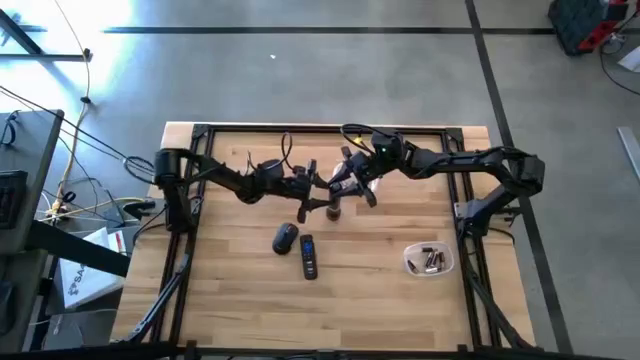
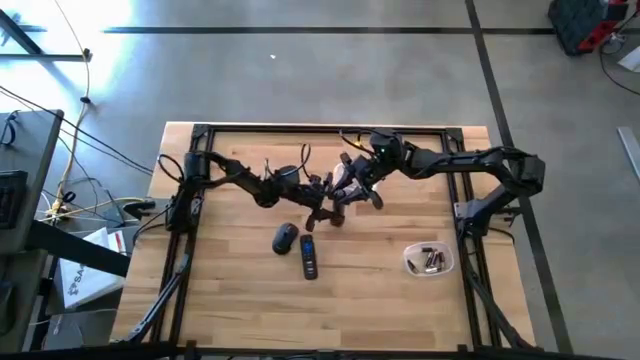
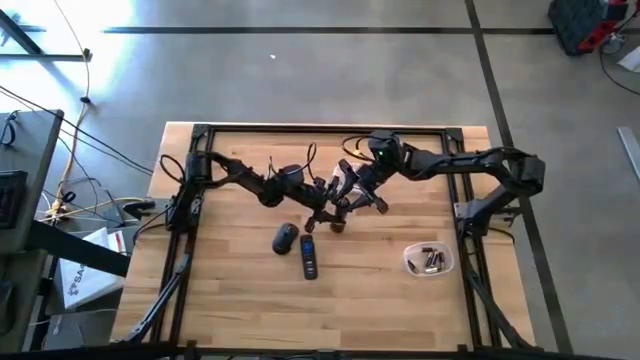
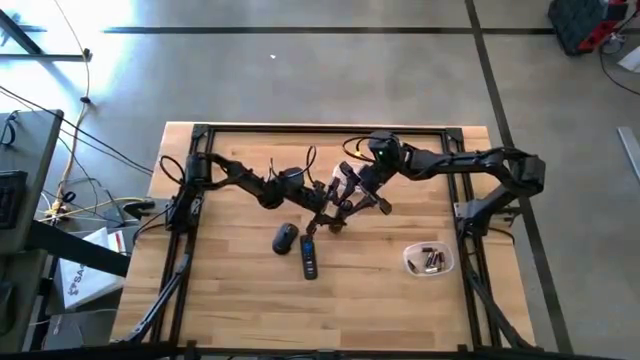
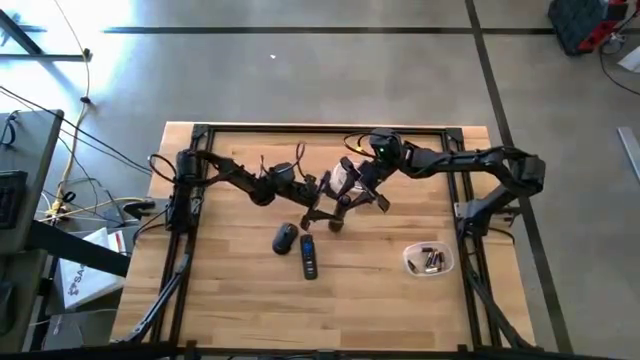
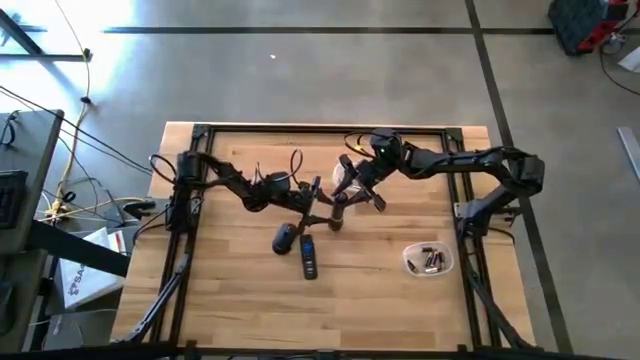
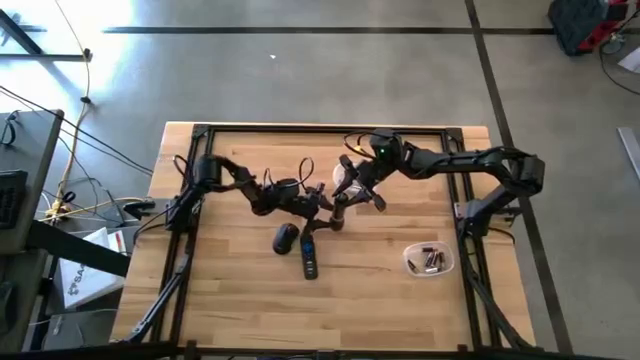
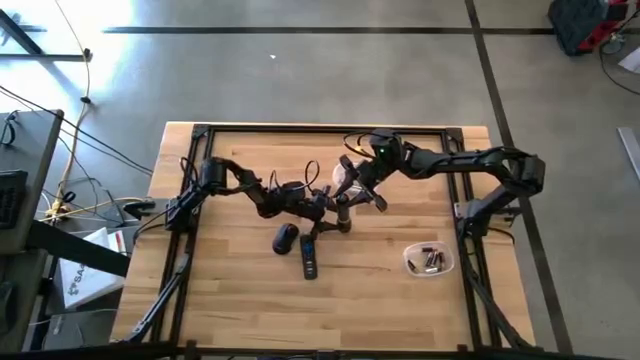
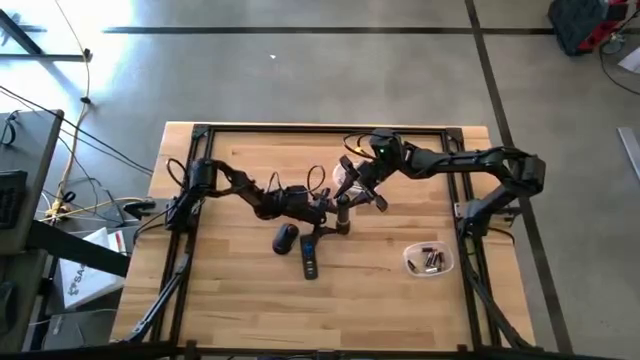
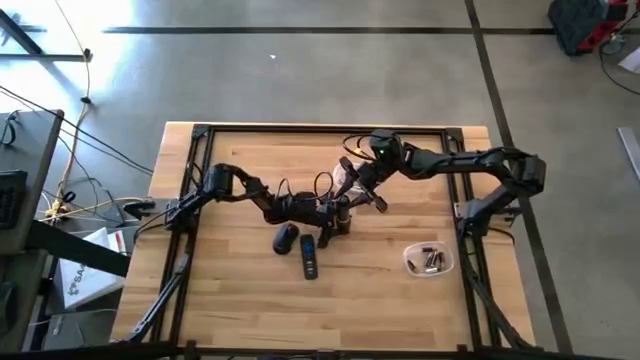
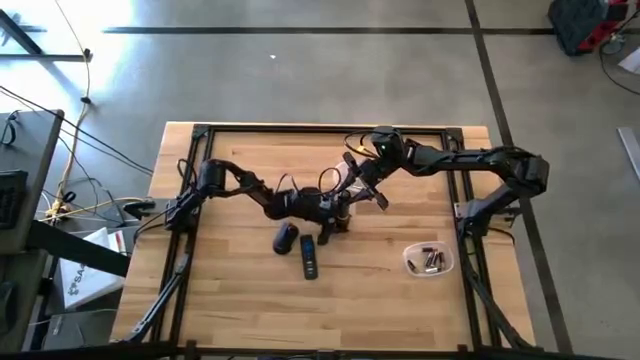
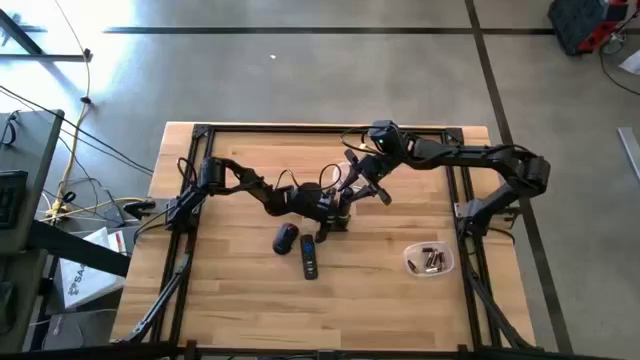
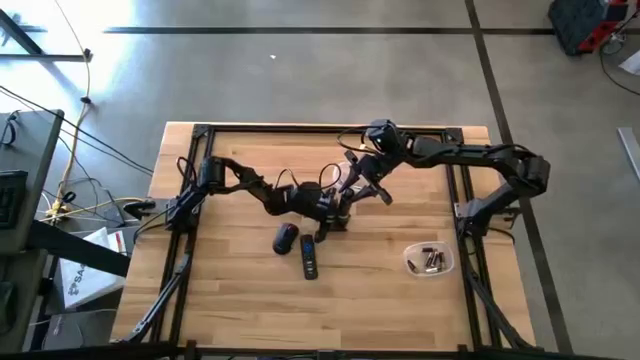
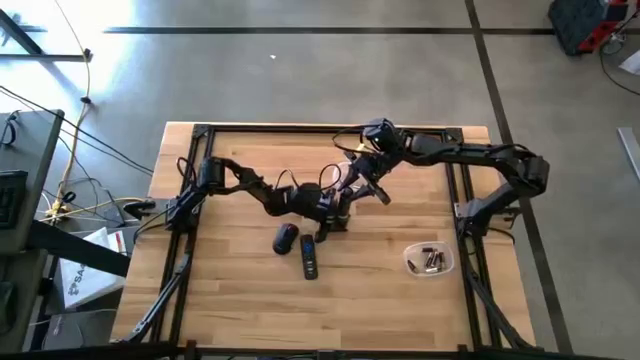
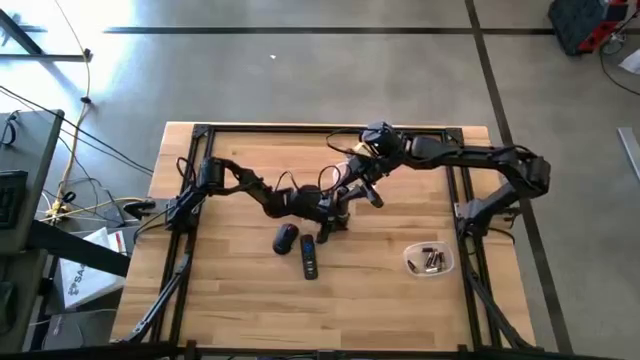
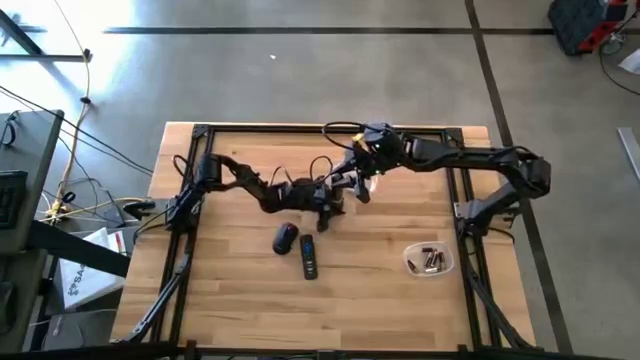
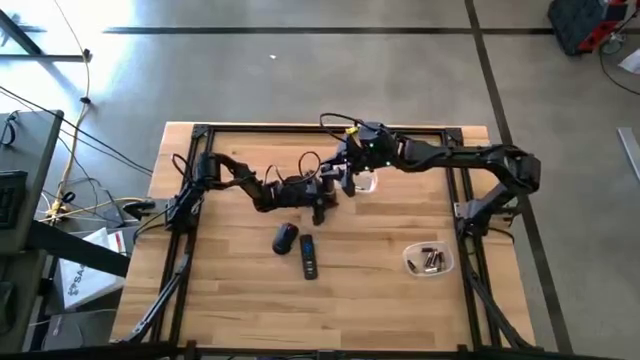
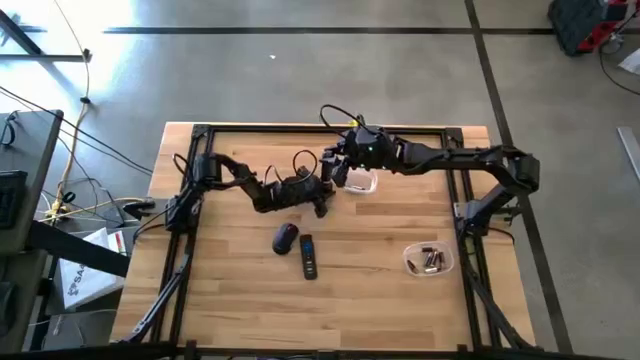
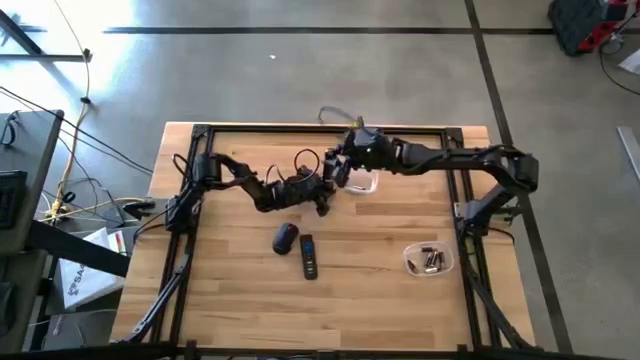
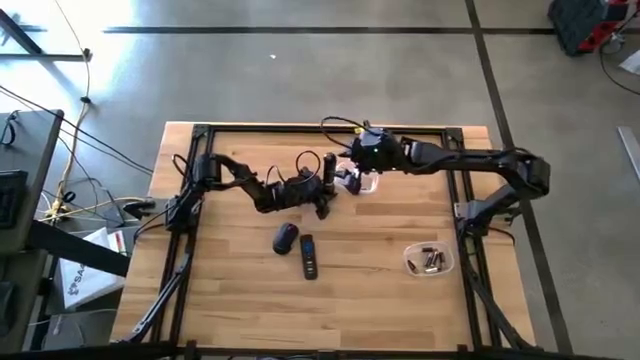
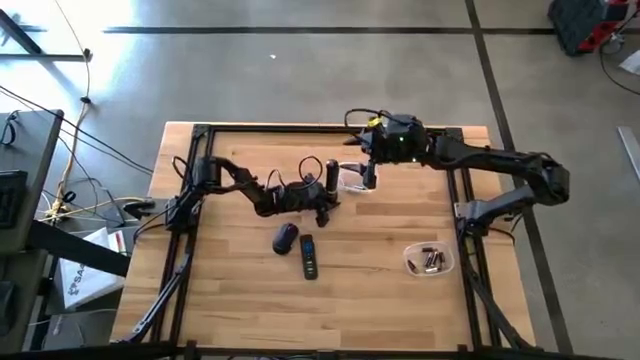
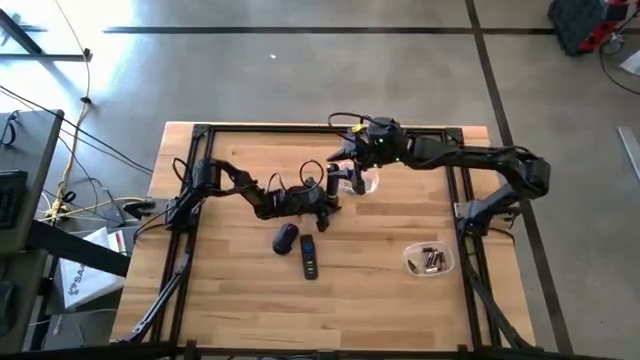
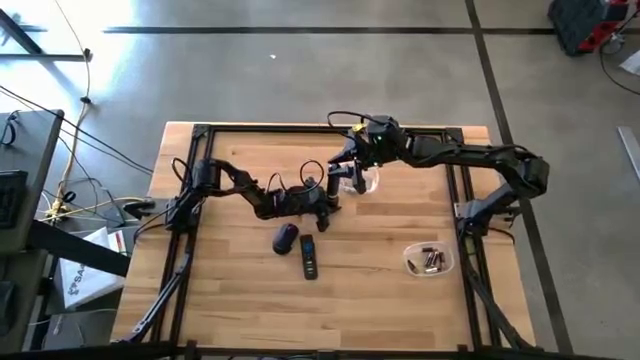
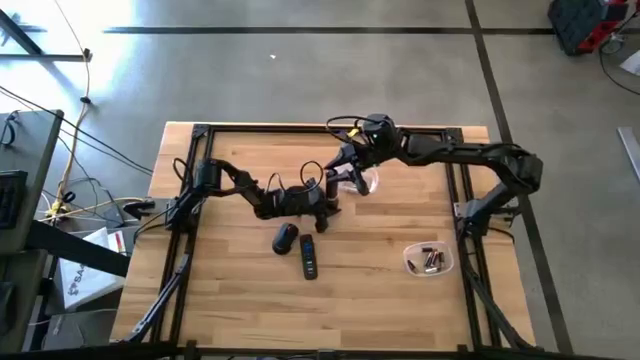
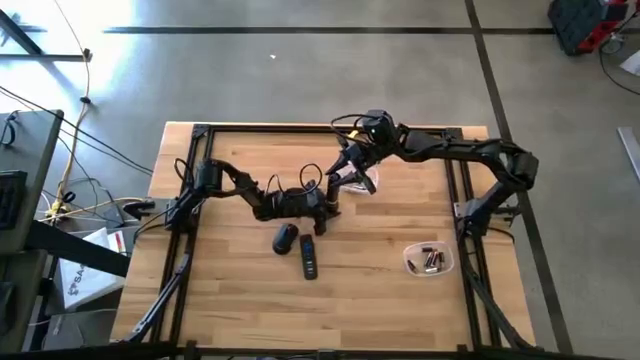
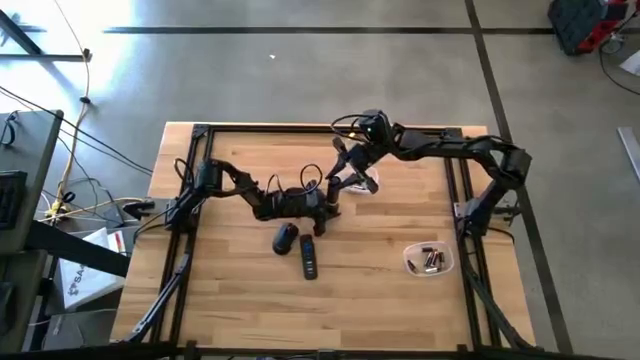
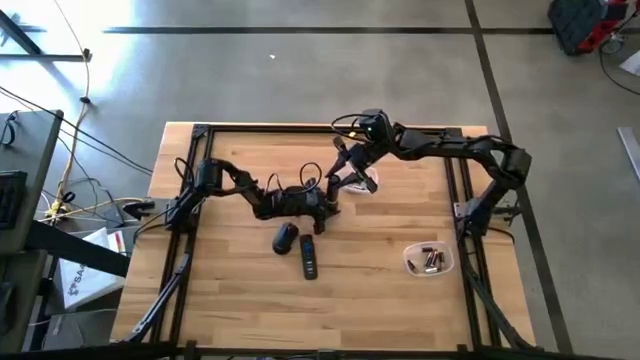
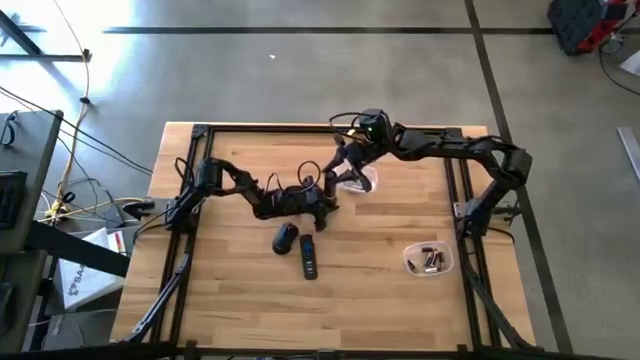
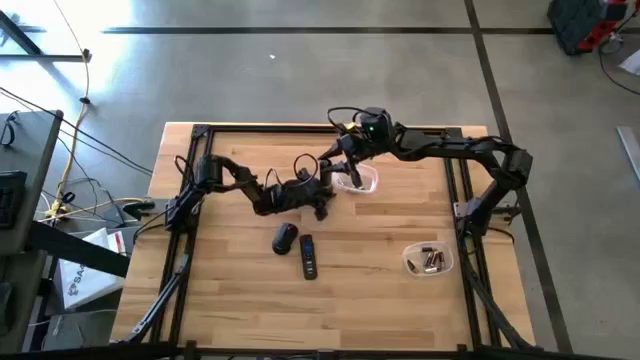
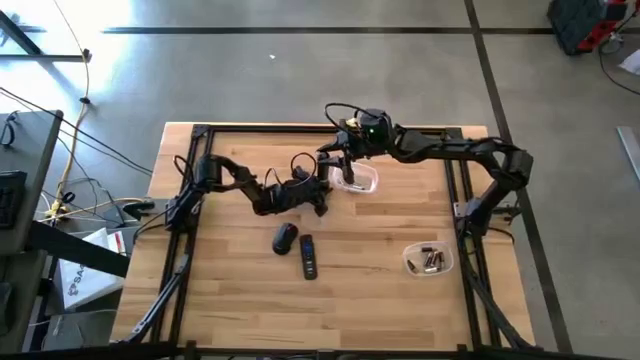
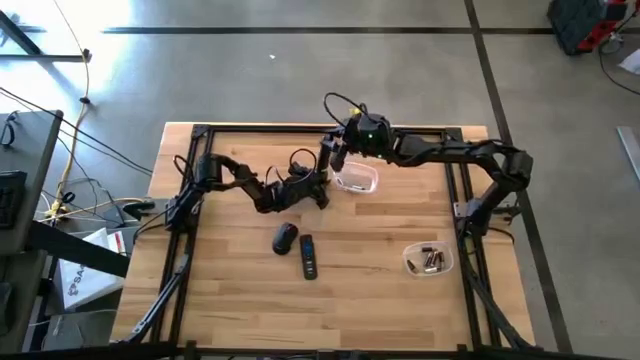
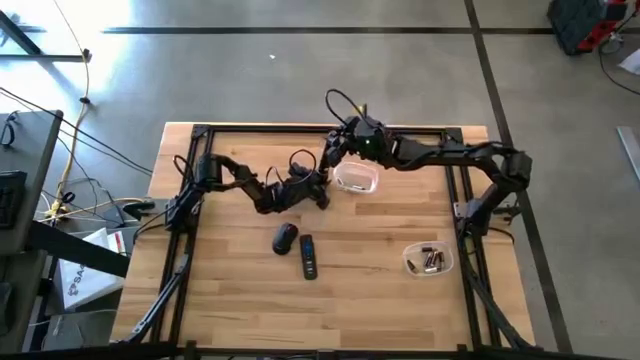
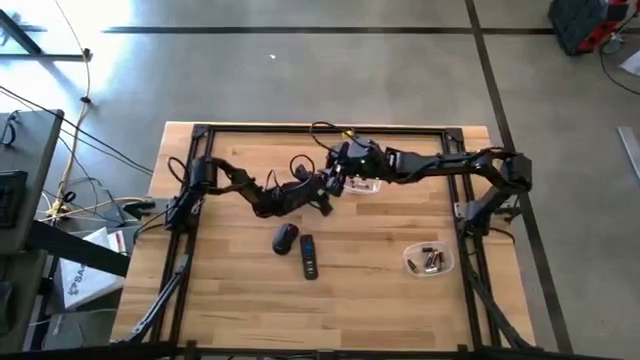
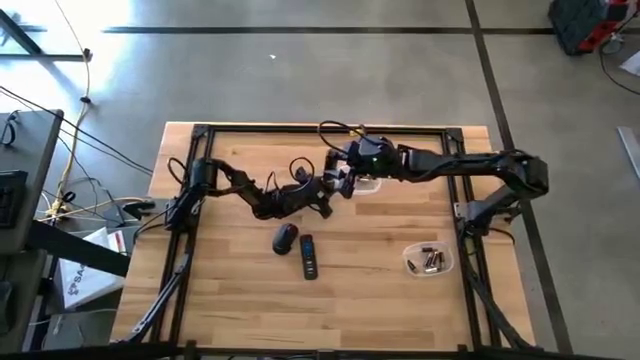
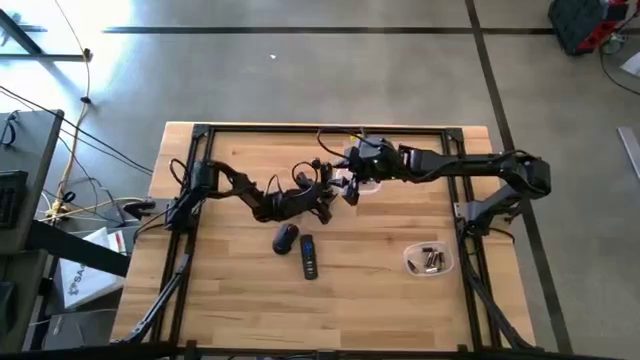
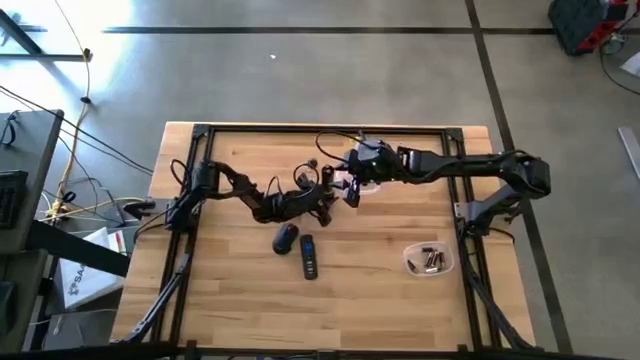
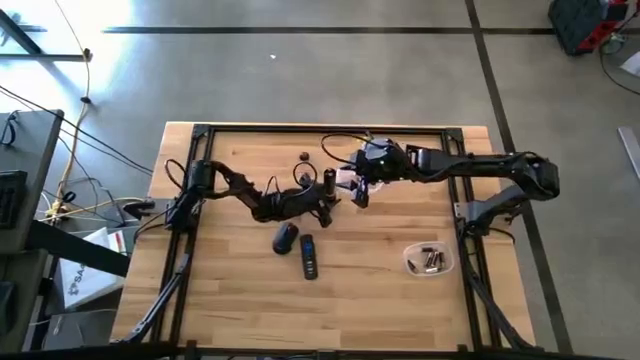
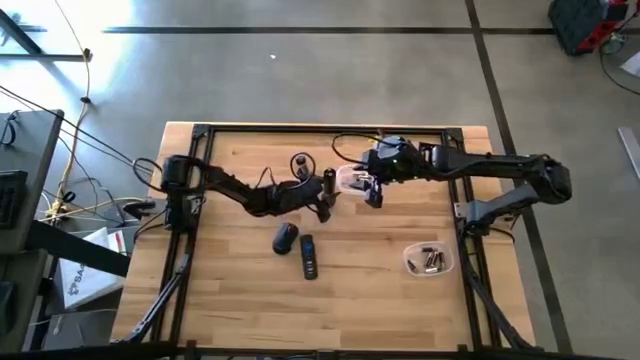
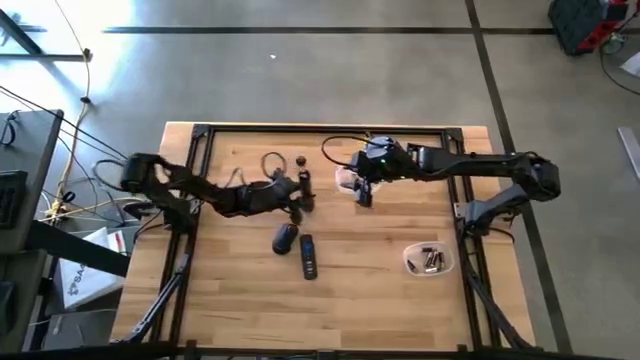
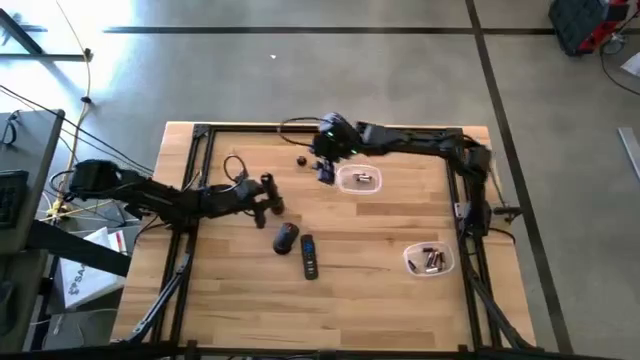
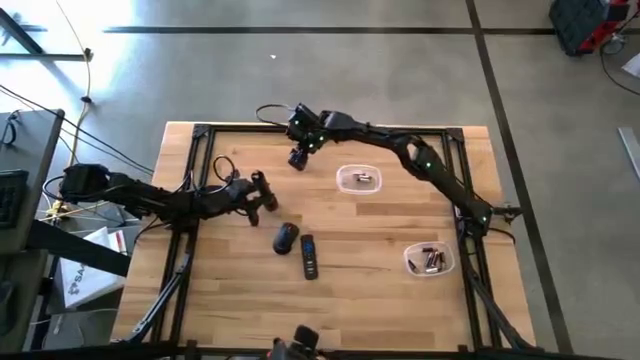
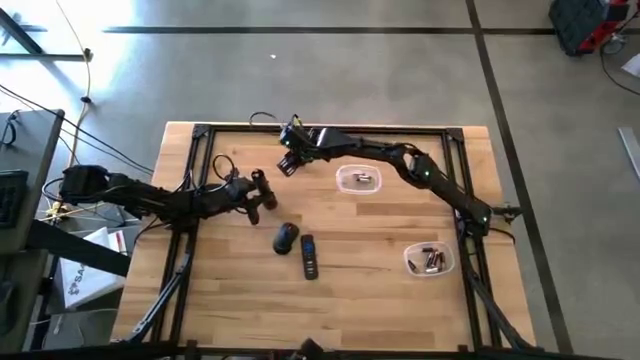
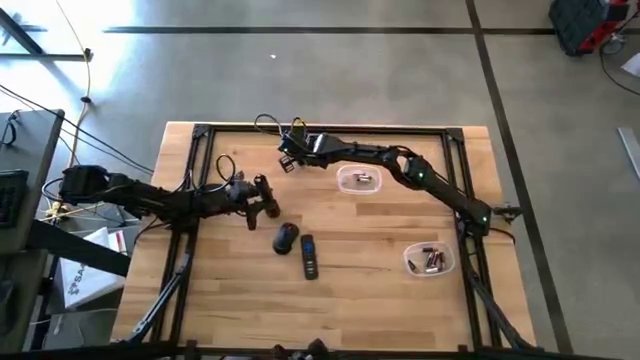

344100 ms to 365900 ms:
Task: Insert battery
Close the flashlight battery compartment
